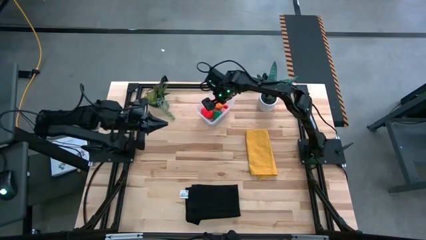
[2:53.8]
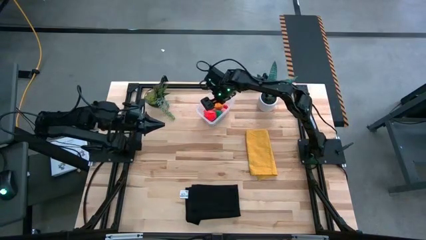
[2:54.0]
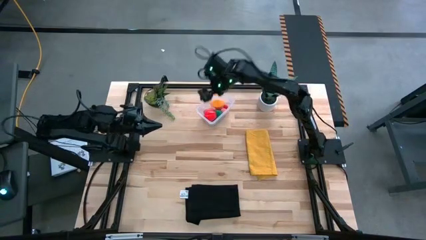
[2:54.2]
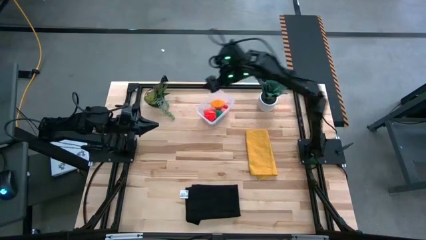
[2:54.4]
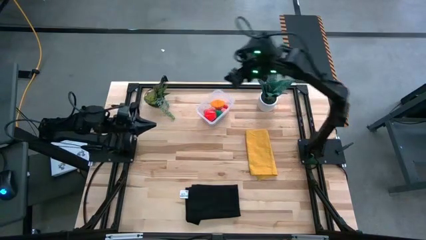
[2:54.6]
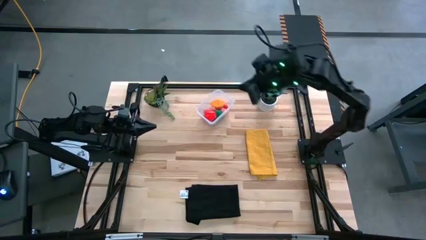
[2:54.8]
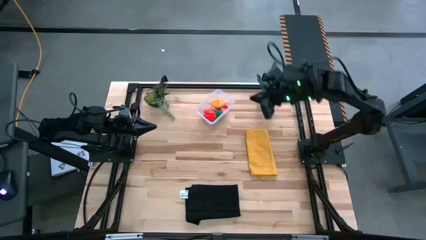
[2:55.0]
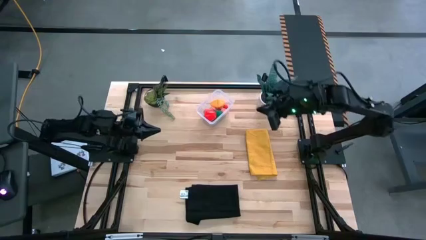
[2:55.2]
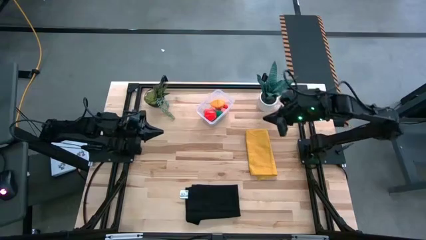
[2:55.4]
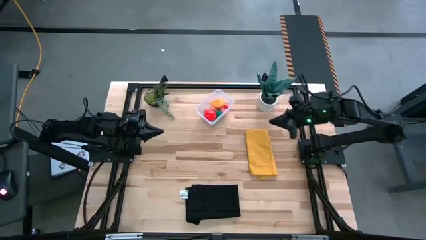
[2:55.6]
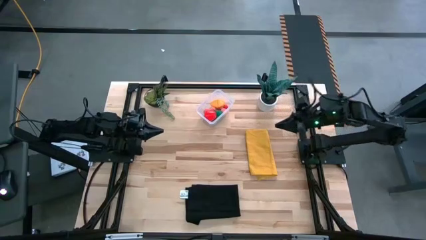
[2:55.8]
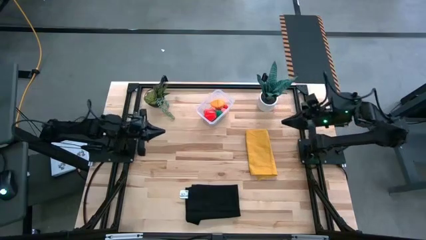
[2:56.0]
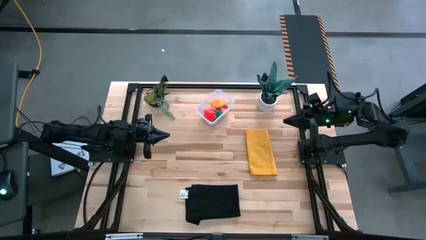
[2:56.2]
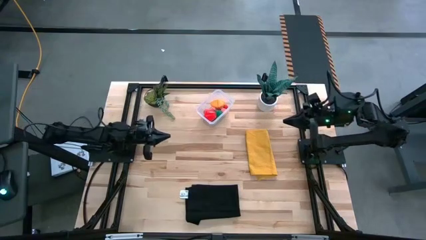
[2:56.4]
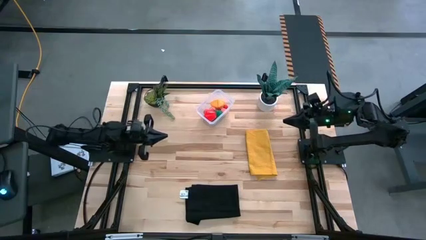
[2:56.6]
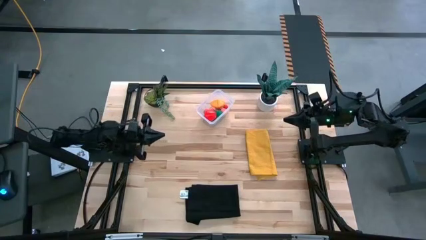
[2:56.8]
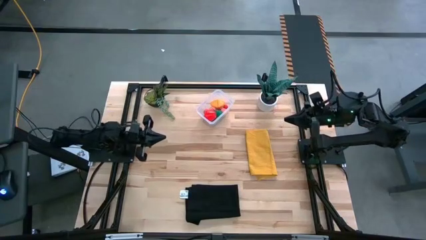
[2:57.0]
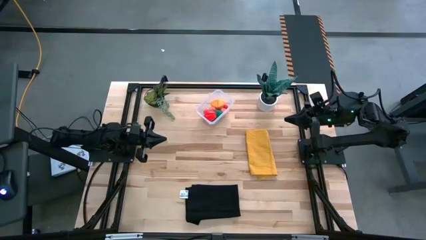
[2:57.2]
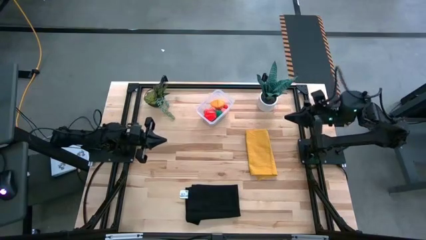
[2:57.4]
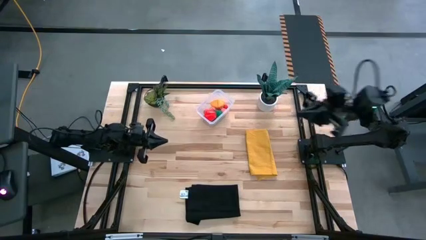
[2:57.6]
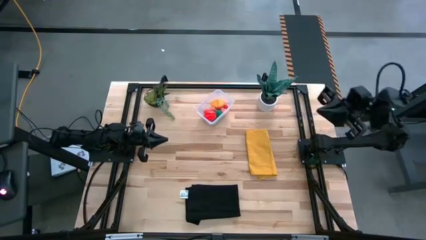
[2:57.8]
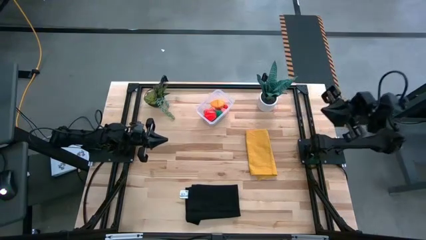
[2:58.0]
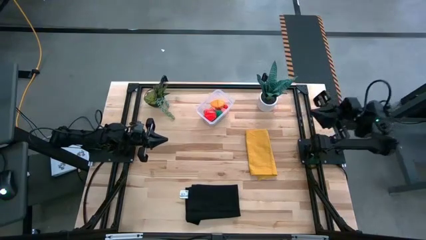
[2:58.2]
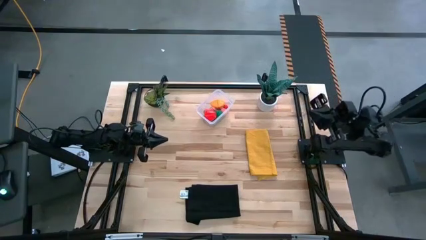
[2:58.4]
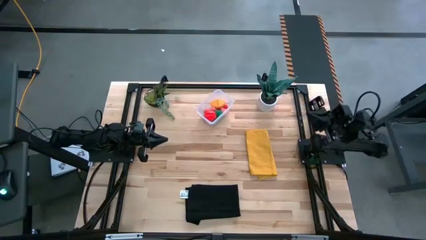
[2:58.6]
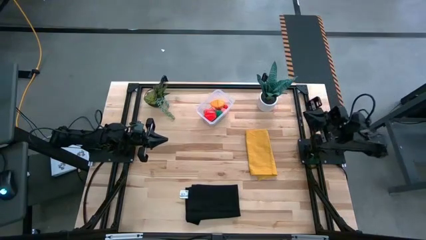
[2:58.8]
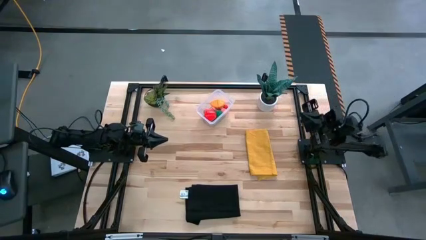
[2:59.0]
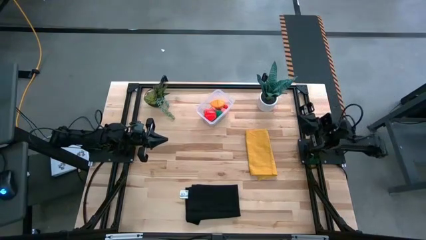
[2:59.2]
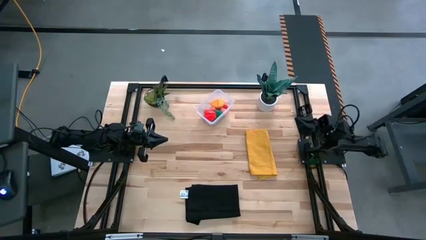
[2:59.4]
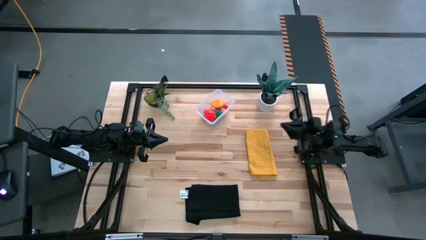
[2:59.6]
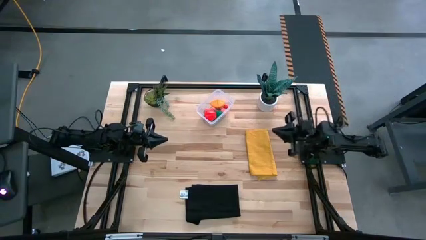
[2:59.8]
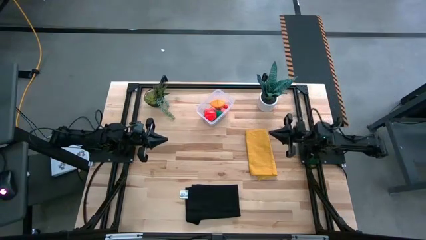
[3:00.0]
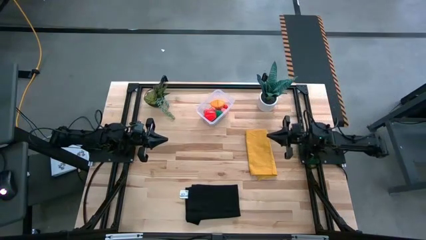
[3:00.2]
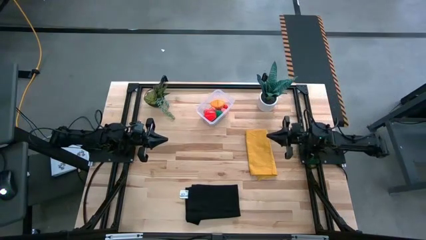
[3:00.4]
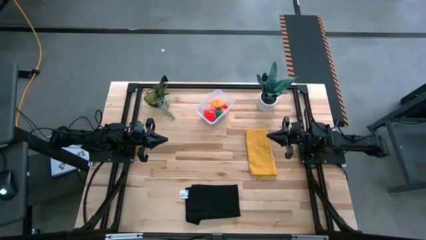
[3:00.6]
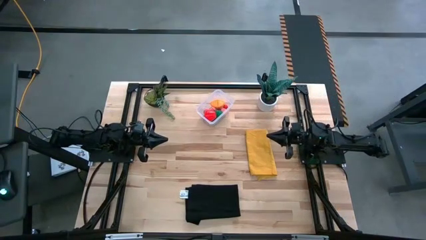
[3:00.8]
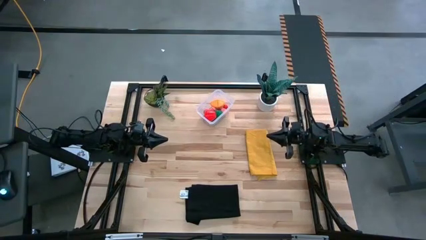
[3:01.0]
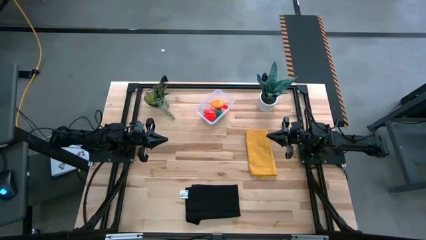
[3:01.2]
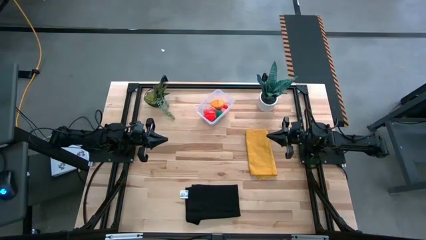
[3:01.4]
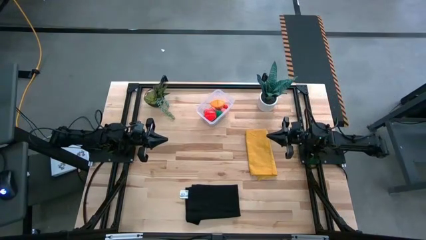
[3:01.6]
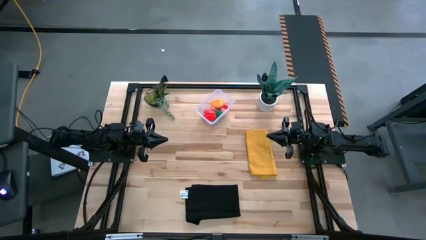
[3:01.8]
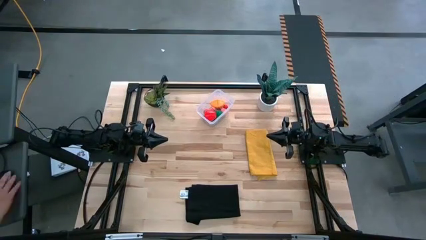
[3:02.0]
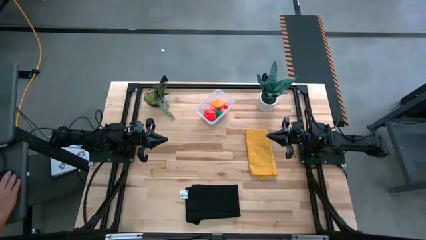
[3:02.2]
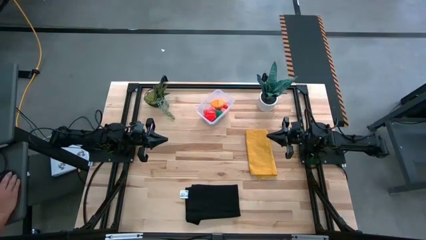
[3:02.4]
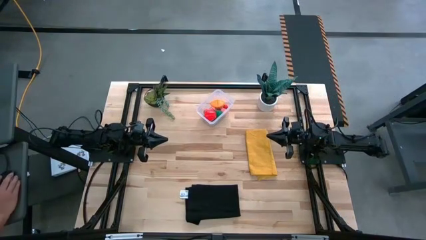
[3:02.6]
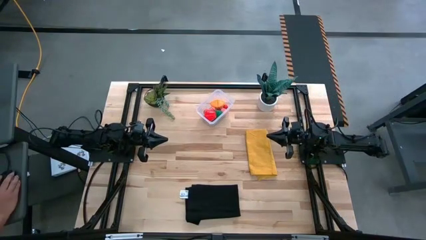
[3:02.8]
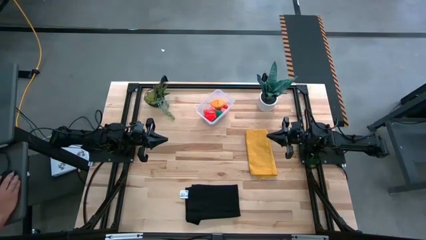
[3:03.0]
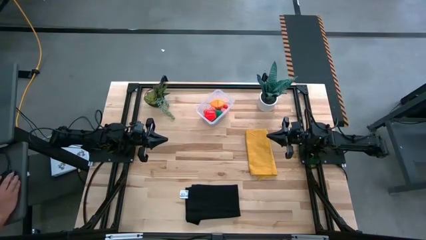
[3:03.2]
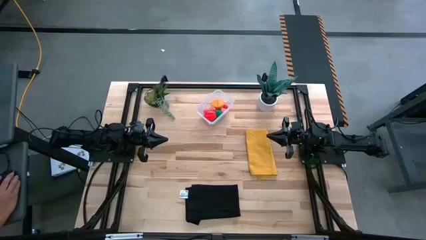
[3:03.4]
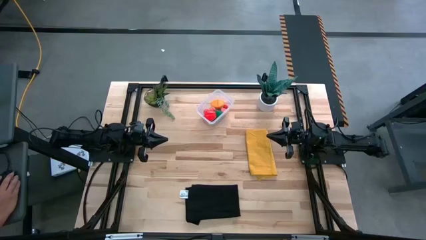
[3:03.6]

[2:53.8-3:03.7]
Task: Pick and placing Produce into tupperware
Return to Home Position
